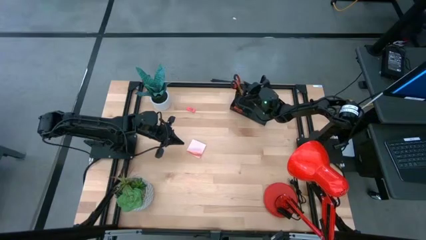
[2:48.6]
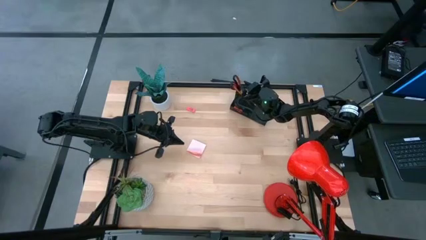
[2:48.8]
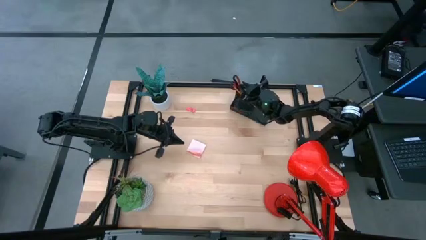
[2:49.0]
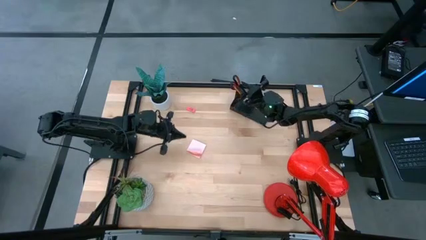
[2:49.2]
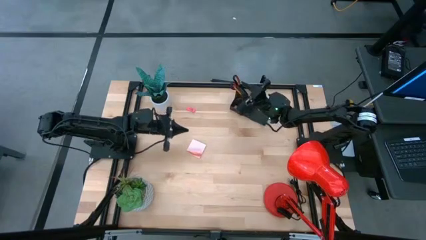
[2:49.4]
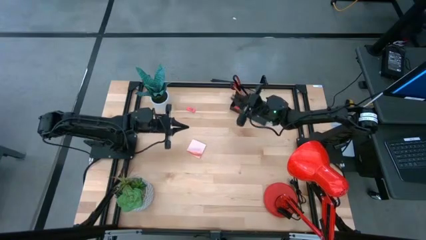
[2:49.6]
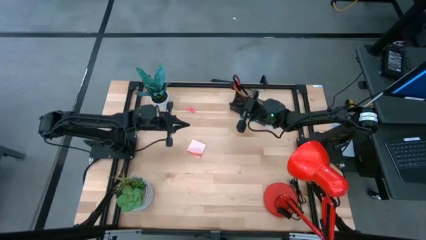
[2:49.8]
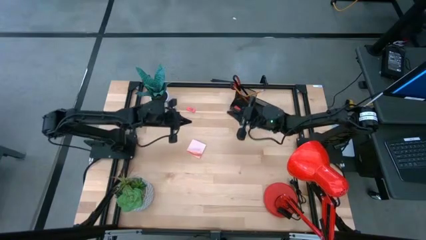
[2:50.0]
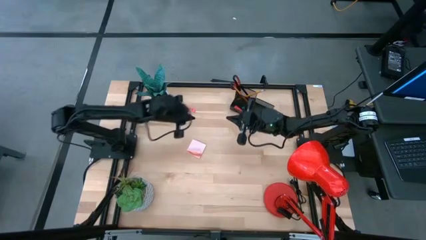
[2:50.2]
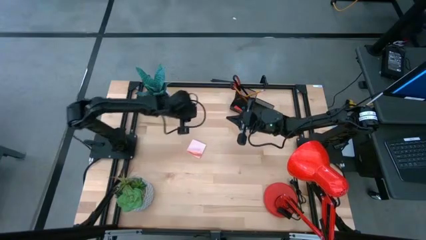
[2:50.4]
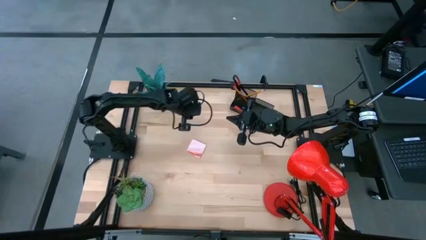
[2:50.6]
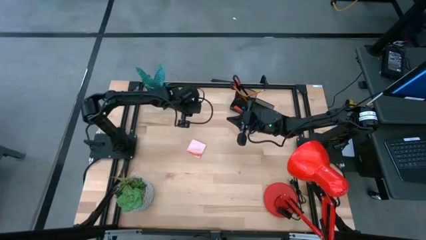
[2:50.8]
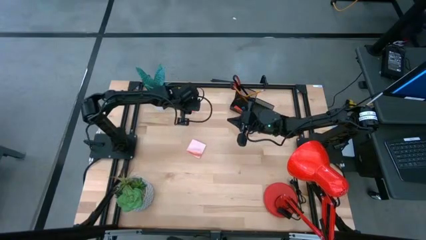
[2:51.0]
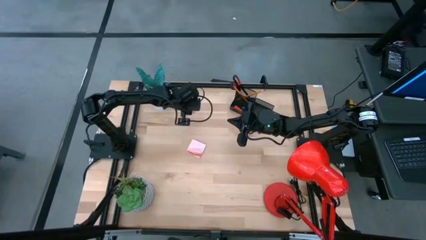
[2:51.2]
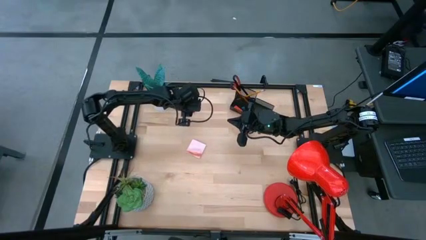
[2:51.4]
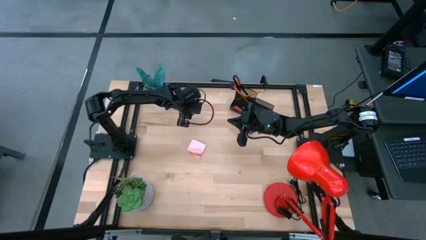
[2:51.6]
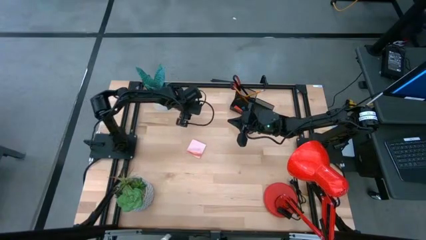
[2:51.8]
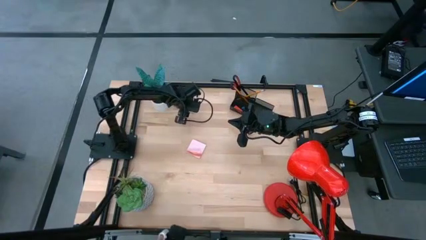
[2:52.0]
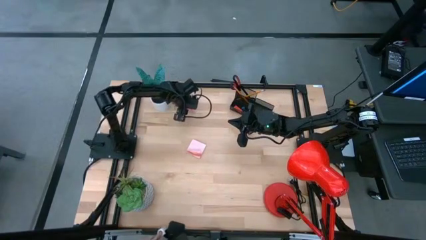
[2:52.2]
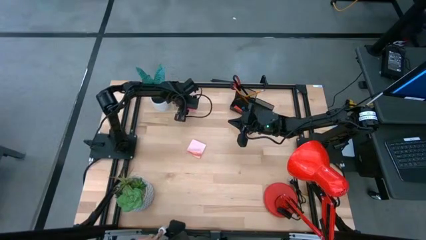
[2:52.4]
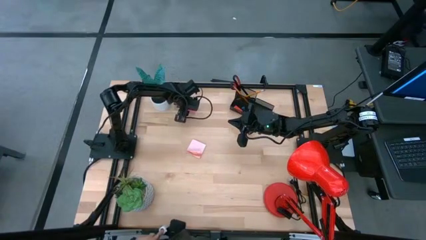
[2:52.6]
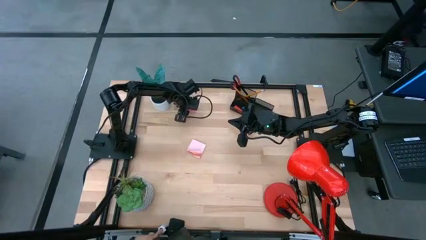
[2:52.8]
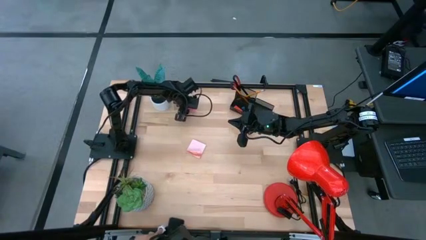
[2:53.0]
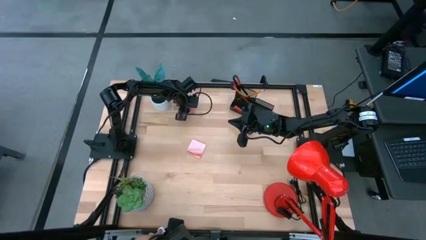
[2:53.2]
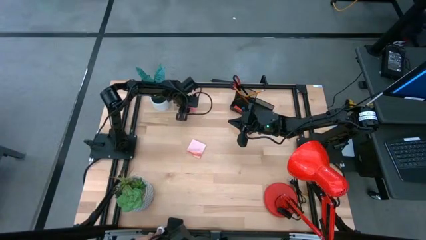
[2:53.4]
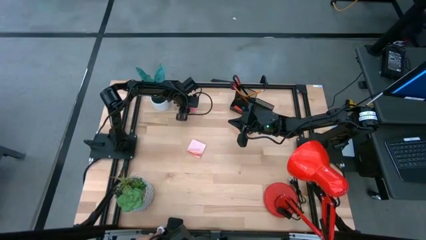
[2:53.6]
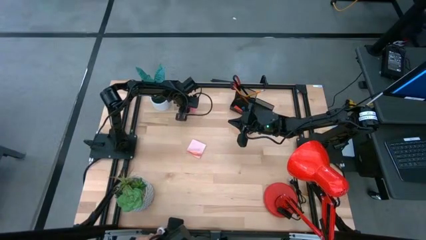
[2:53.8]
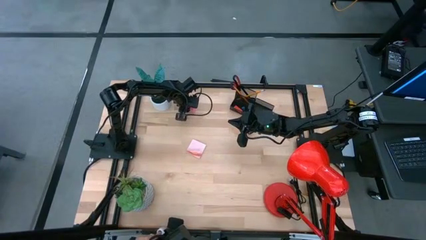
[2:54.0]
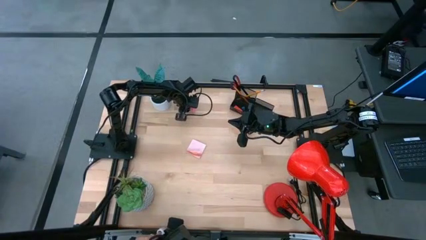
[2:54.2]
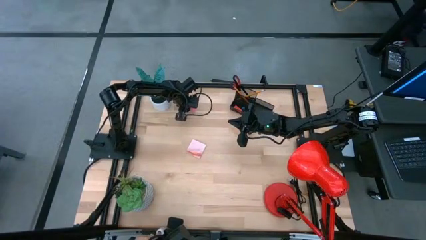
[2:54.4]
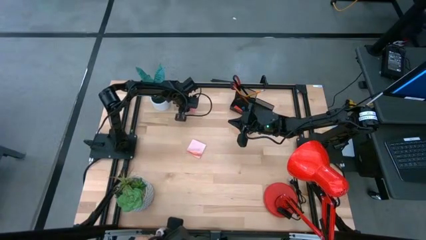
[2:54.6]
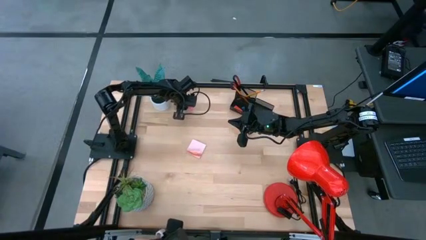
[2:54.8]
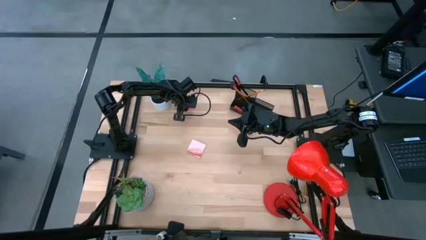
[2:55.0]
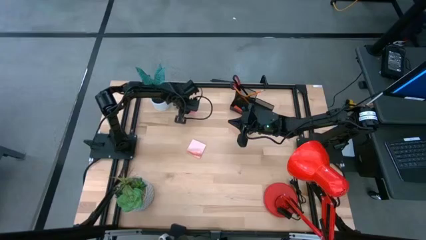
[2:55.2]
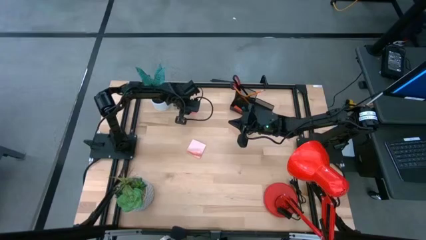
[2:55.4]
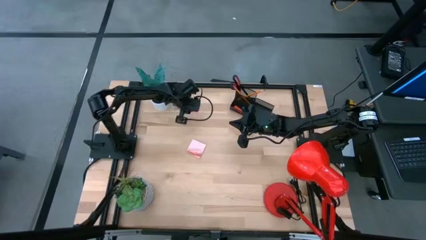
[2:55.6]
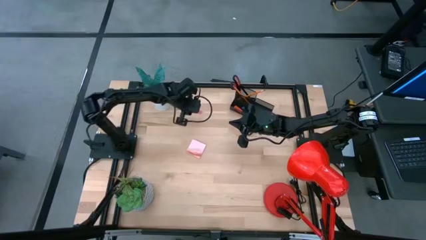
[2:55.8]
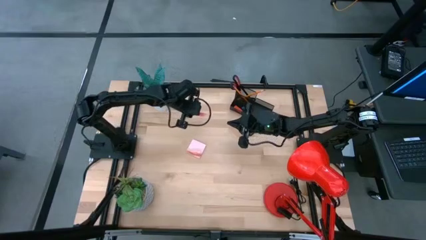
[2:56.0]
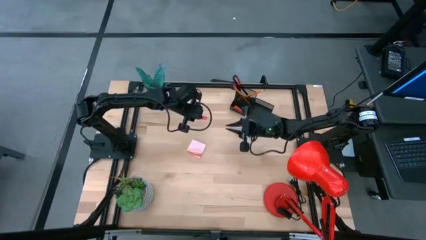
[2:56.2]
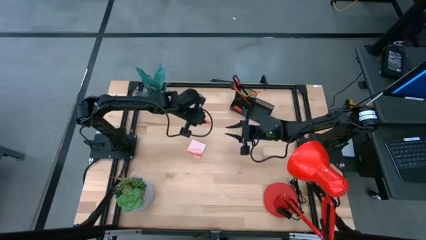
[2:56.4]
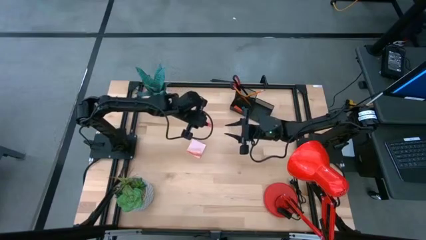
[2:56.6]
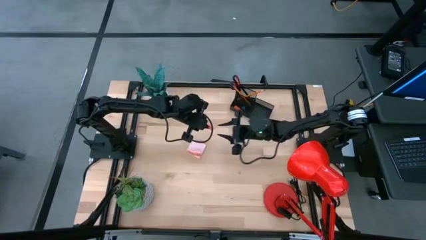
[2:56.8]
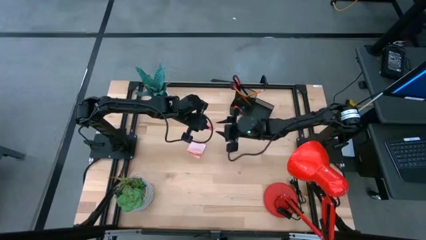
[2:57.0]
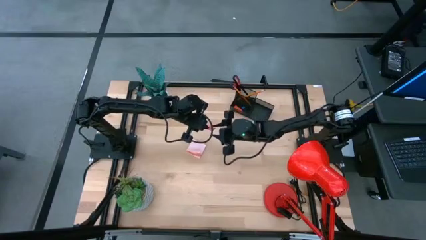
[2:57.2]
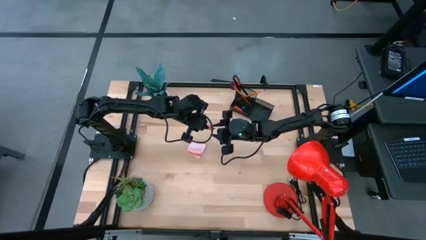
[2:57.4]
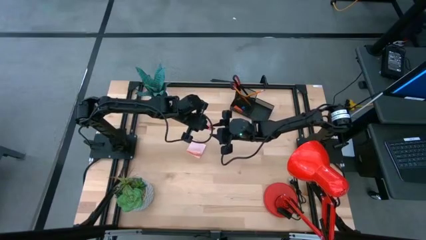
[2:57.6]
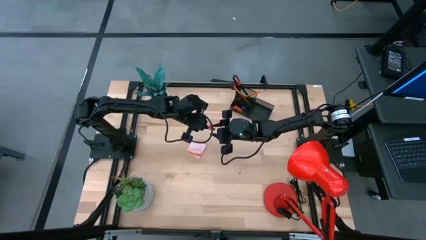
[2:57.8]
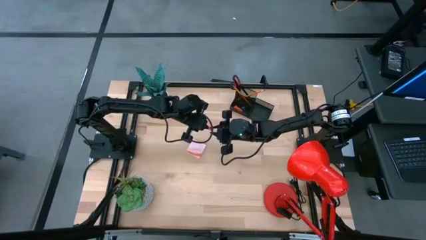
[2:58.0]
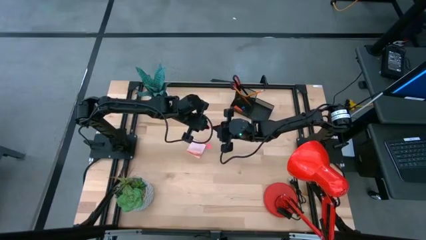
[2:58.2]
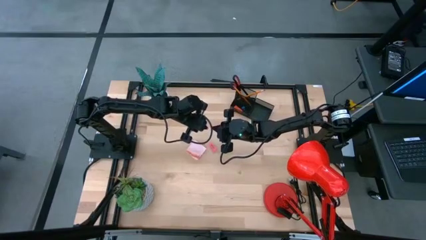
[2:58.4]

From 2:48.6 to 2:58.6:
Task: Pick and place office supplies into organizer
Put the pink eraser into the black desk organizer

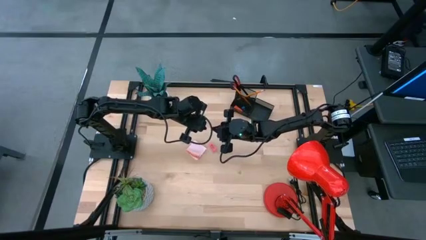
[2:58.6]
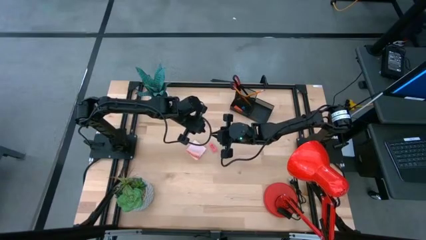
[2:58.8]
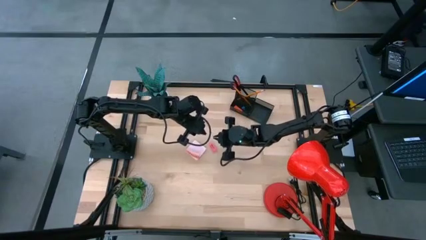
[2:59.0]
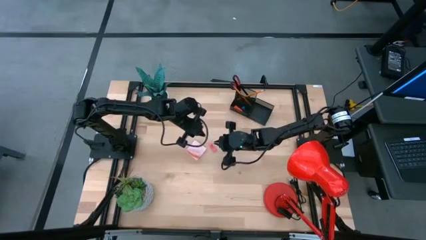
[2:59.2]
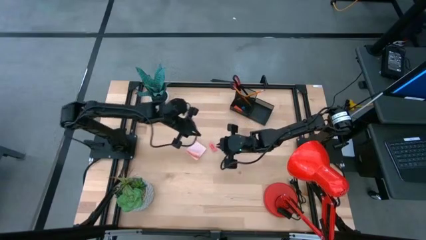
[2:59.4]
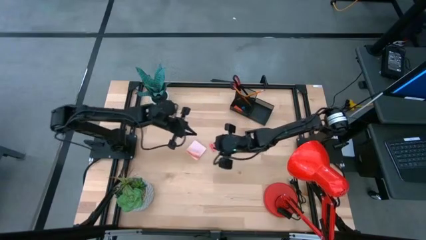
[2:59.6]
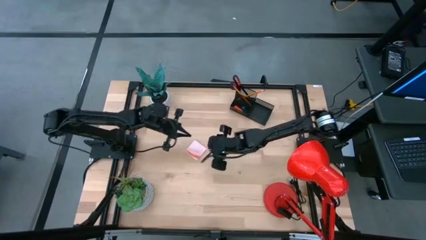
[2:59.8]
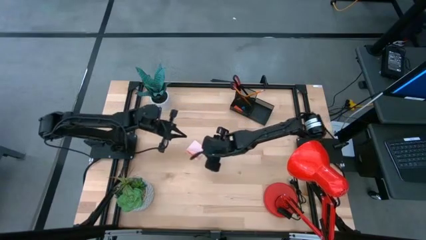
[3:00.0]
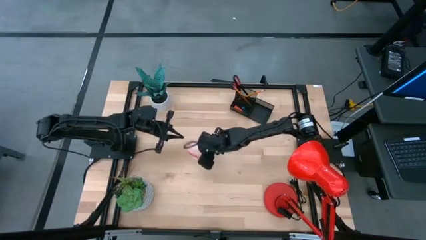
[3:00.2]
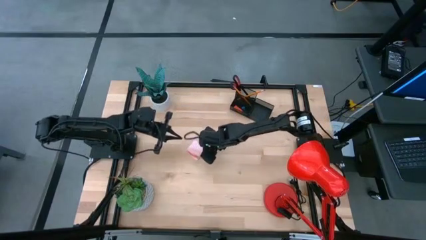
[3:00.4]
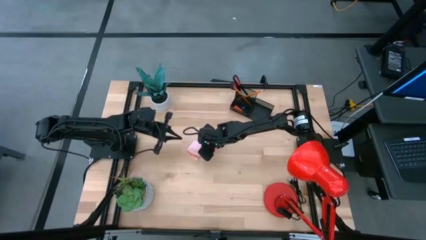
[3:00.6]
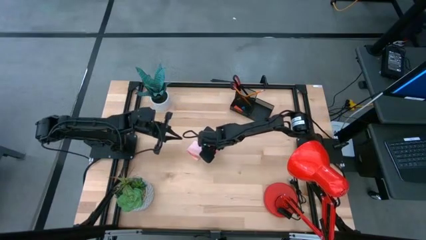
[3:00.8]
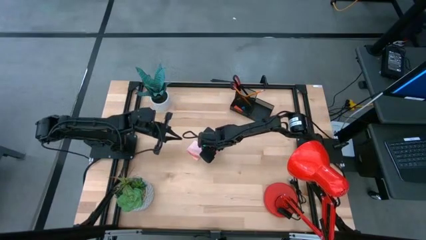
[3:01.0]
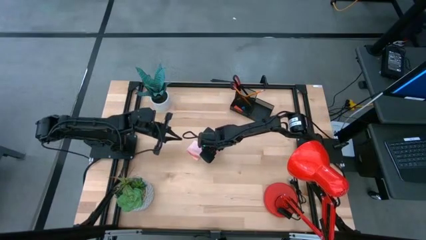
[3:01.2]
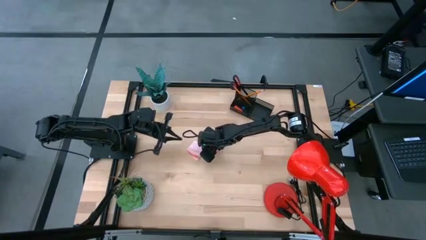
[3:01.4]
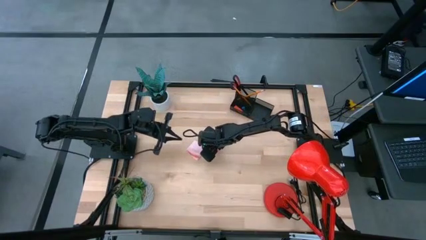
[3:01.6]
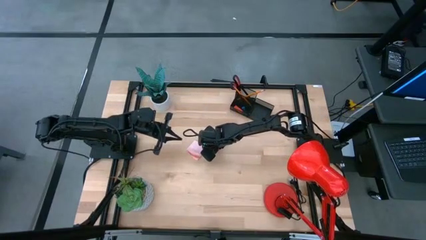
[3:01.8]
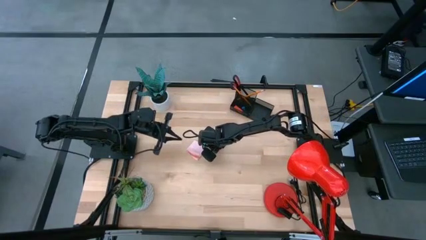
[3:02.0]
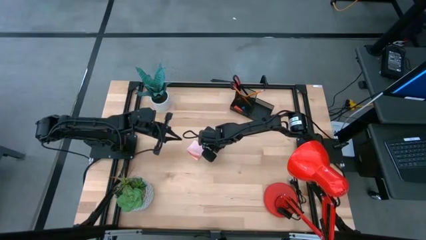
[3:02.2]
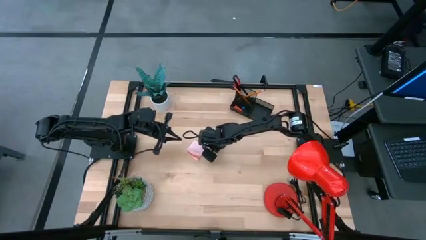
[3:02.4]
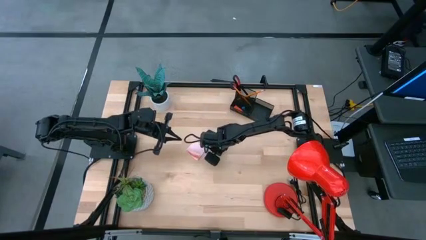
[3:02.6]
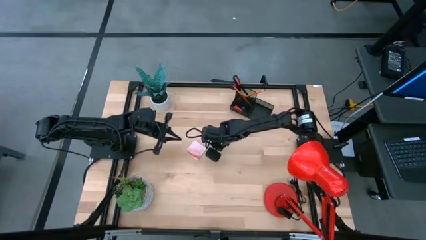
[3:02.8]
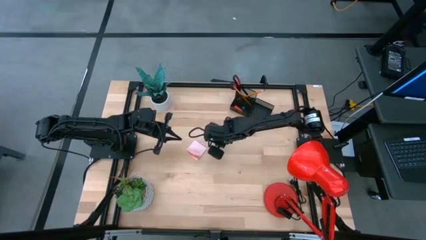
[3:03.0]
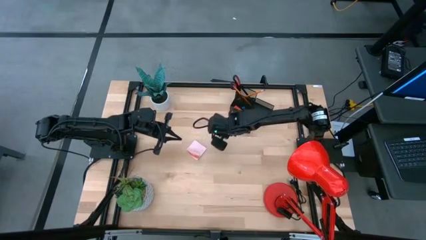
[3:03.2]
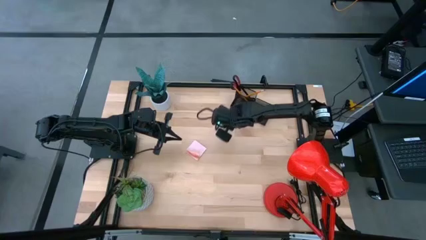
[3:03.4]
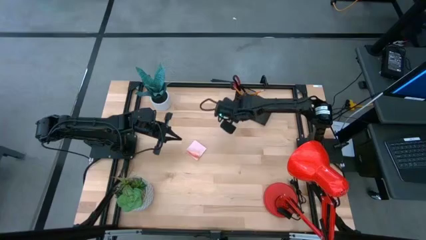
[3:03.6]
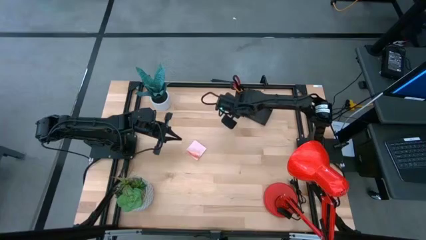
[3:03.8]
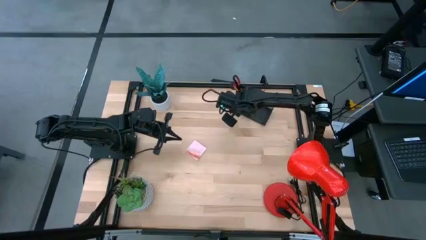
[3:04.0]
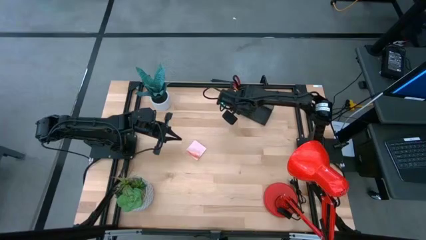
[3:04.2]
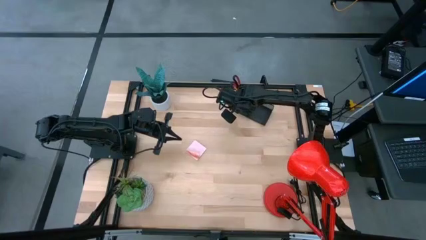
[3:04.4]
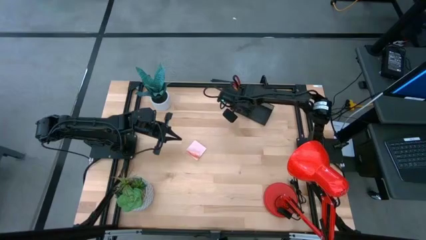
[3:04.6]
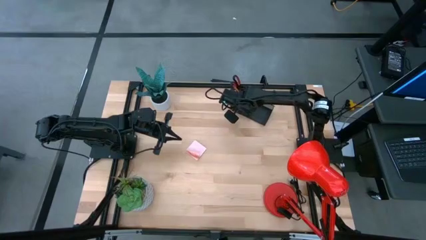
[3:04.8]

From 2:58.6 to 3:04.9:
Put the pink eraser into the black desk organizer
